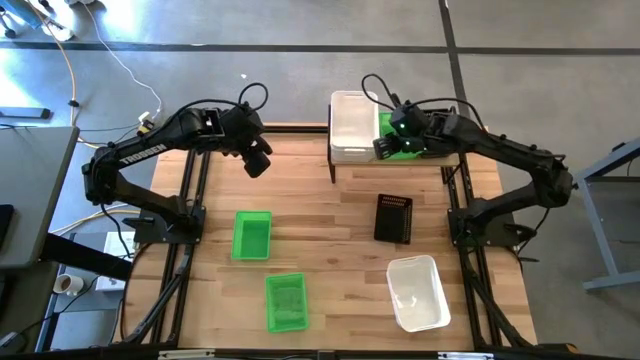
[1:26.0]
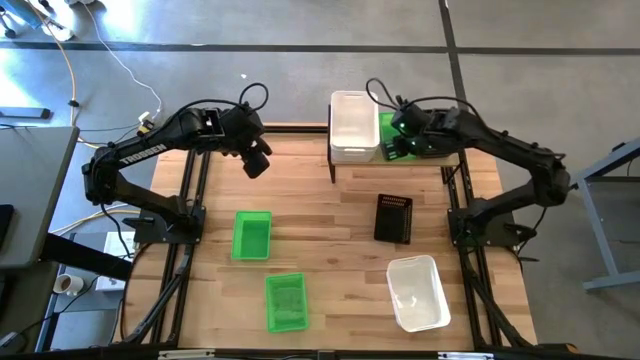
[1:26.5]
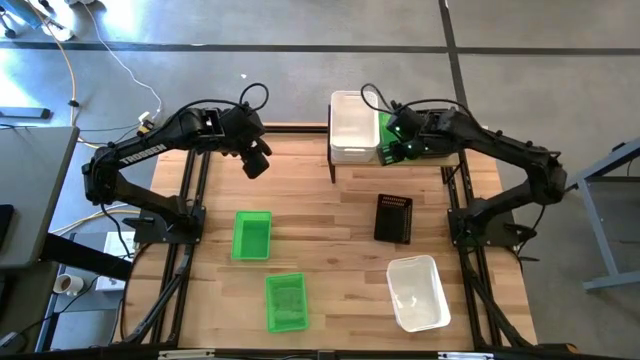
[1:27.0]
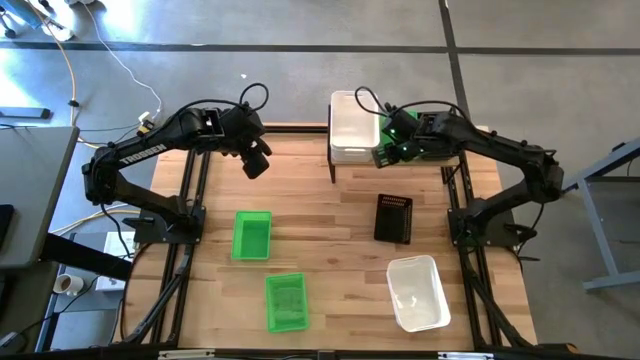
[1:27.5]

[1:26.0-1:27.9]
Task: Stack baskets on shelf by color
Adjust the green bin on the shelf

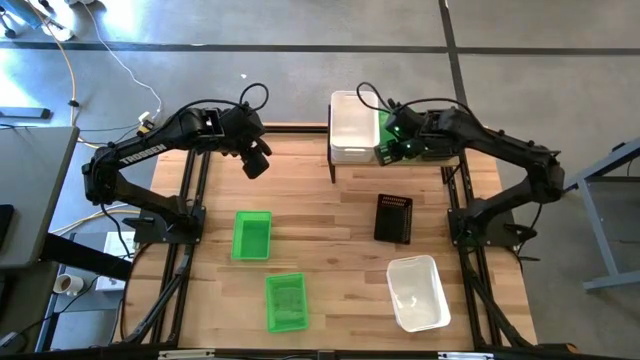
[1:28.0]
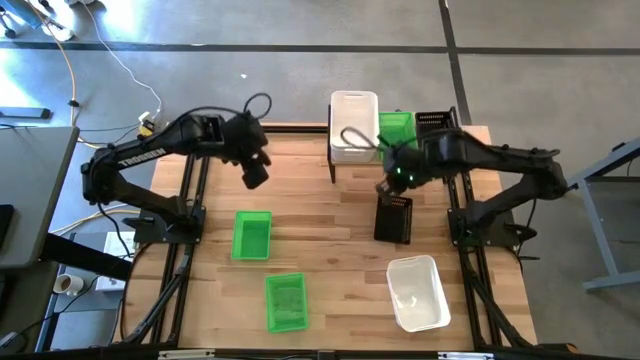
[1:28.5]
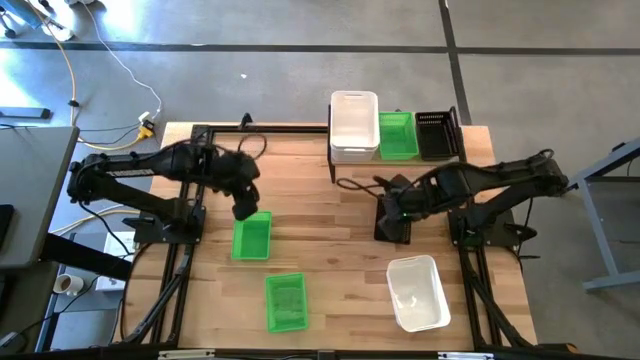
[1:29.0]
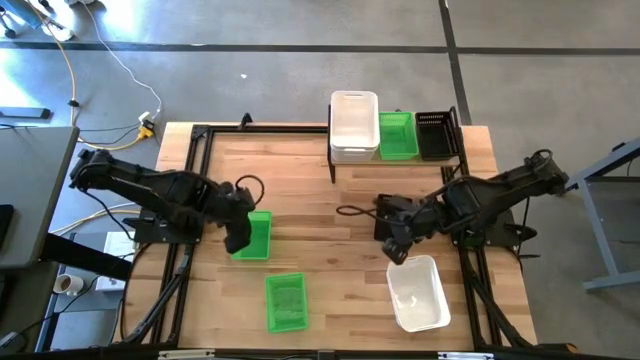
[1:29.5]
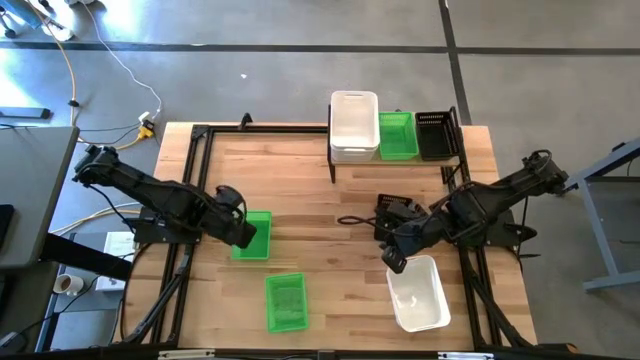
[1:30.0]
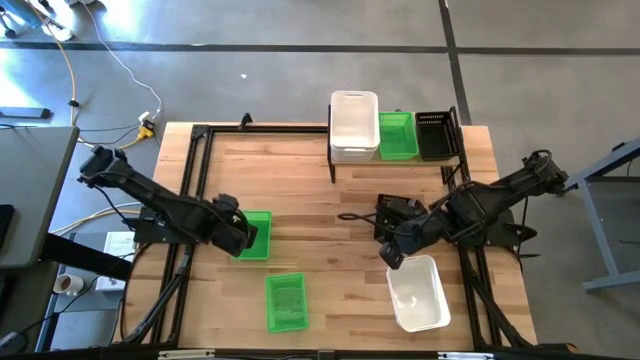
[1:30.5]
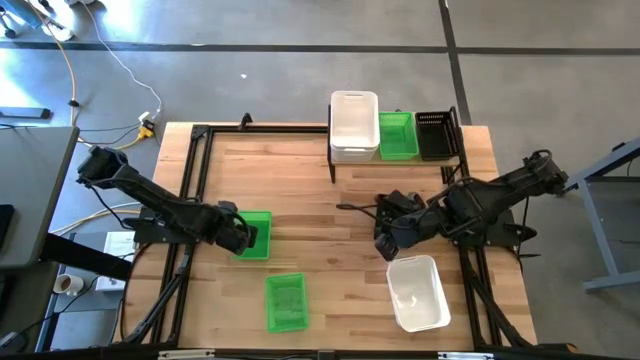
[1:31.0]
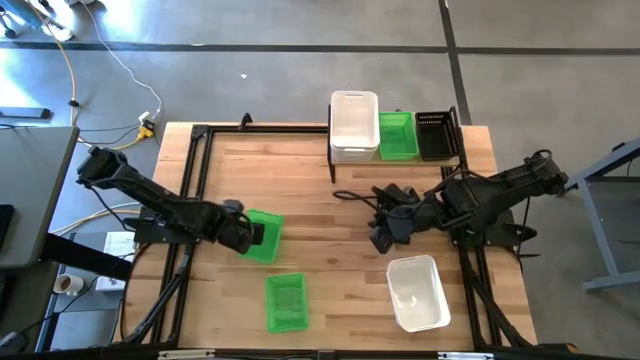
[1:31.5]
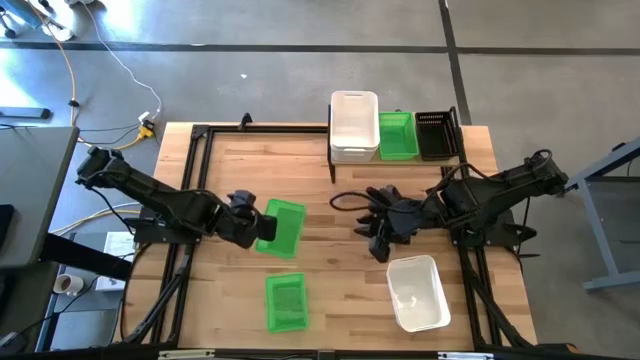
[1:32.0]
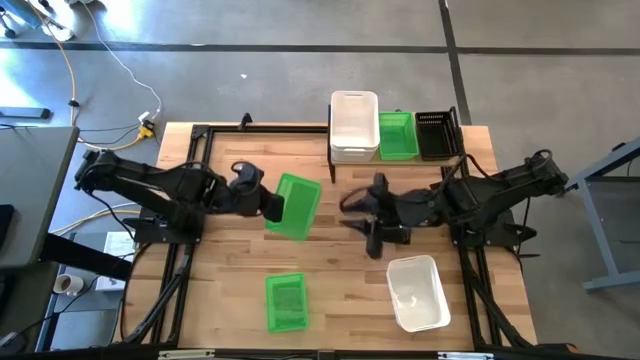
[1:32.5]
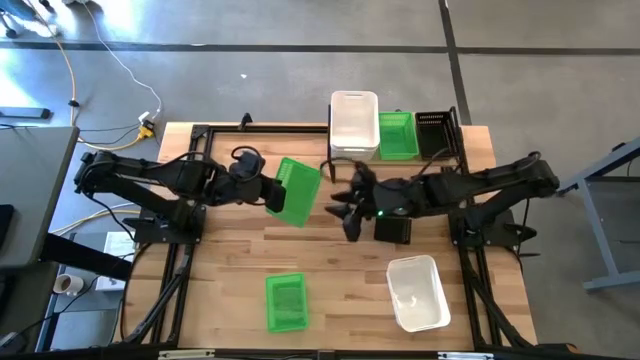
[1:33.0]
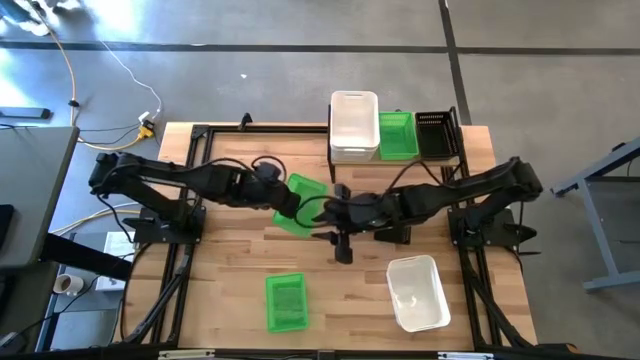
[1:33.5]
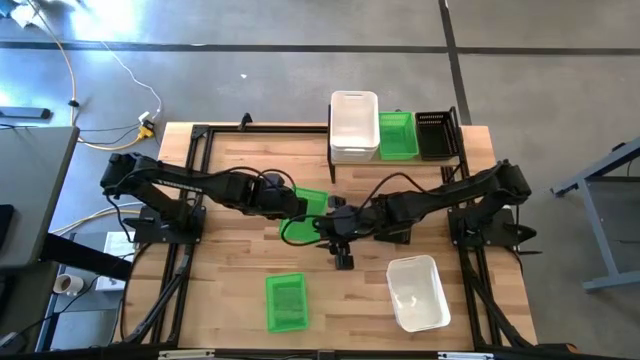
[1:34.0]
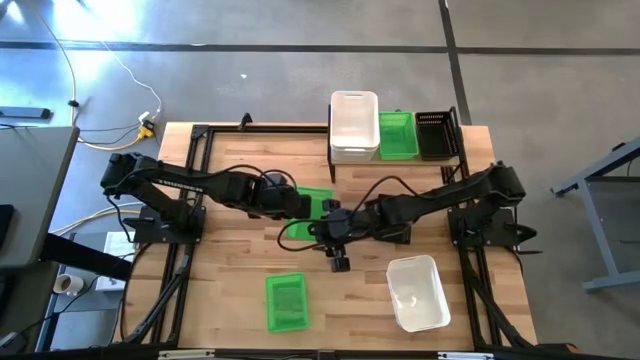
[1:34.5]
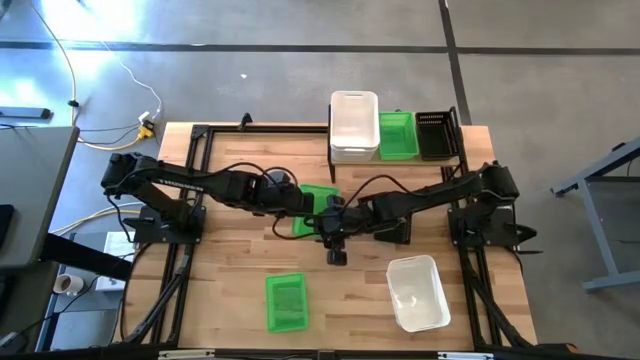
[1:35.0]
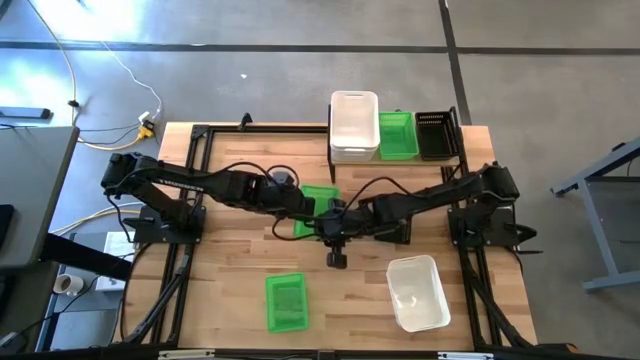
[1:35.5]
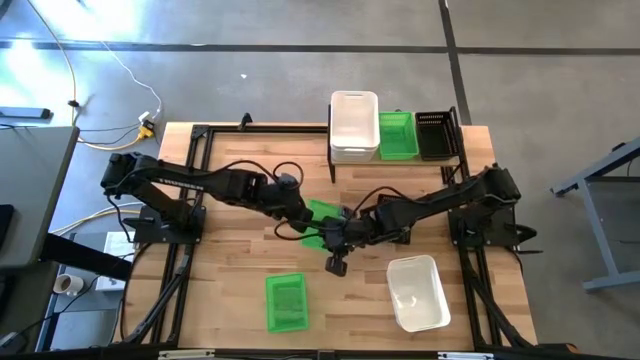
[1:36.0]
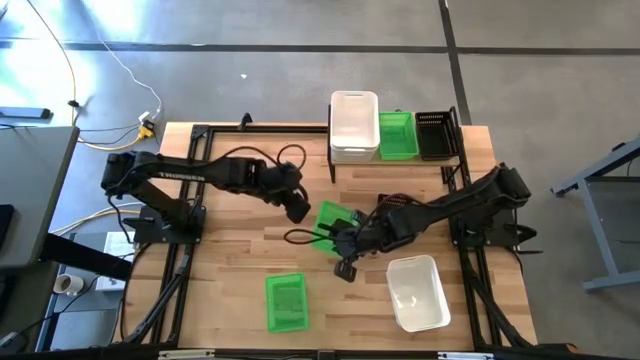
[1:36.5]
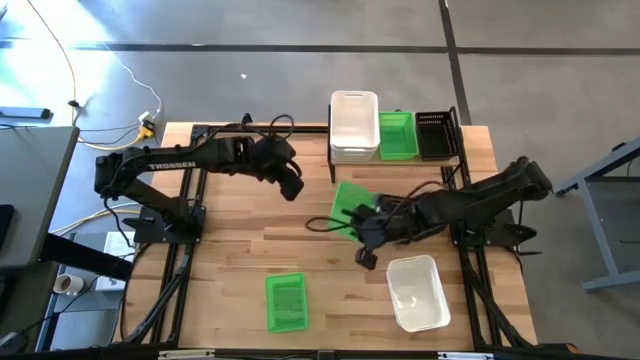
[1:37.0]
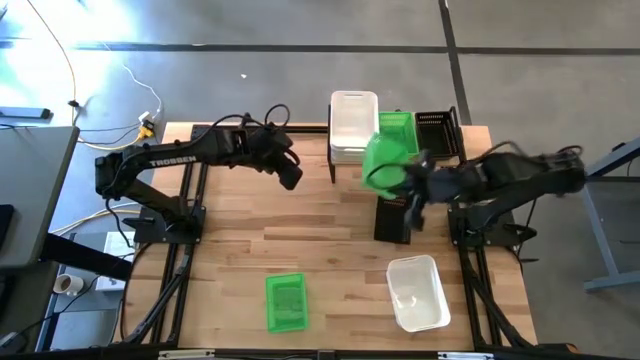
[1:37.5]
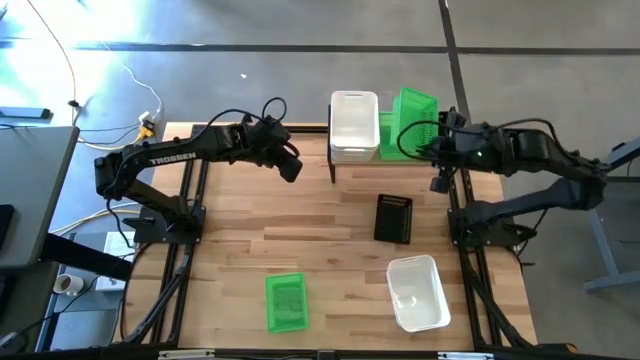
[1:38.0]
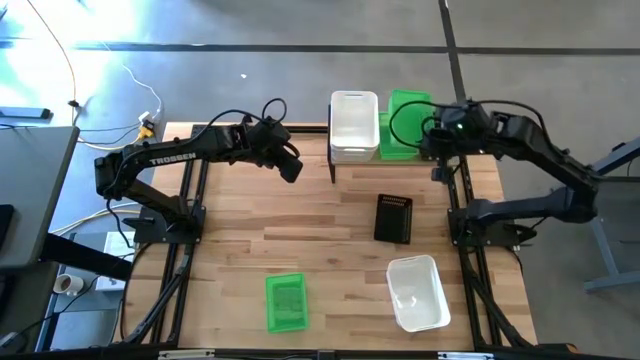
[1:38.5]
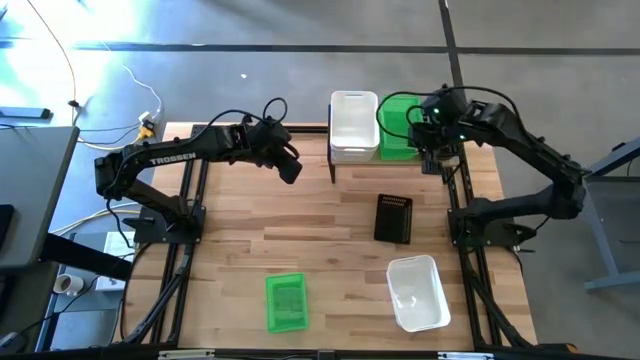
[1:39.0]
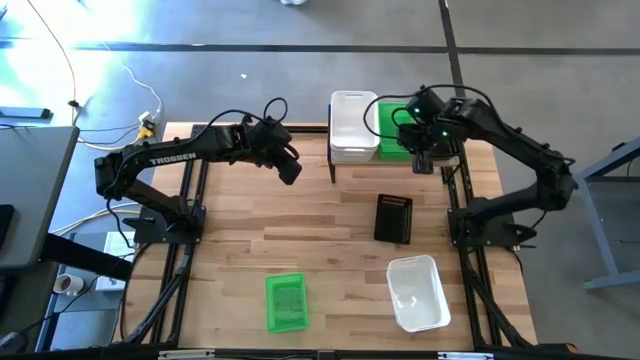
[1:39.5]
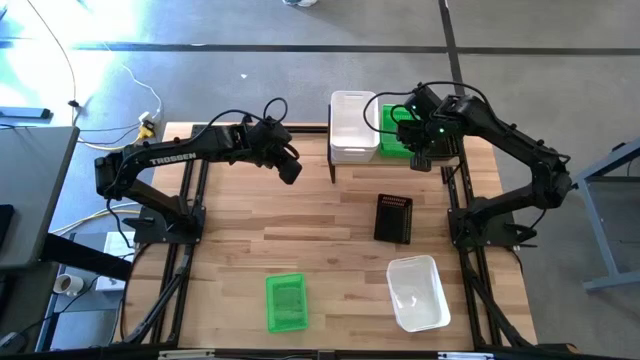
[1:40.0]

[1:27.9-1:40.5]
Stack the top green bin on top of the green bin

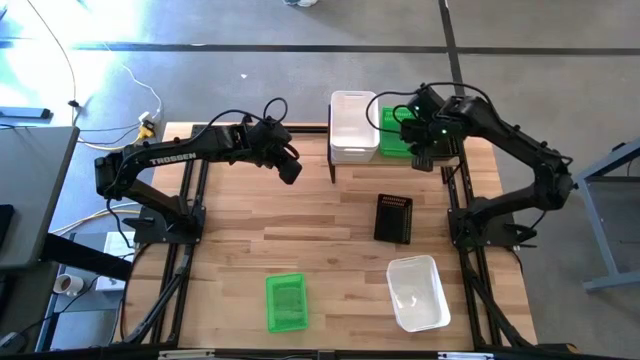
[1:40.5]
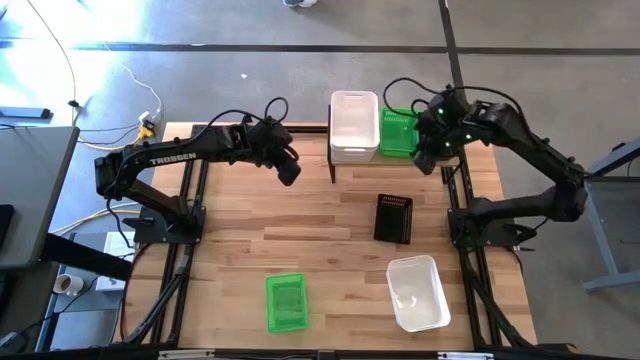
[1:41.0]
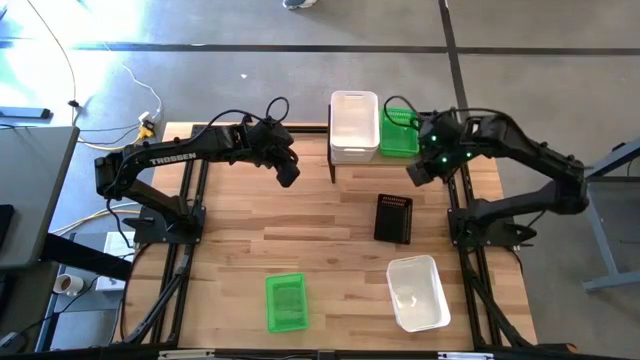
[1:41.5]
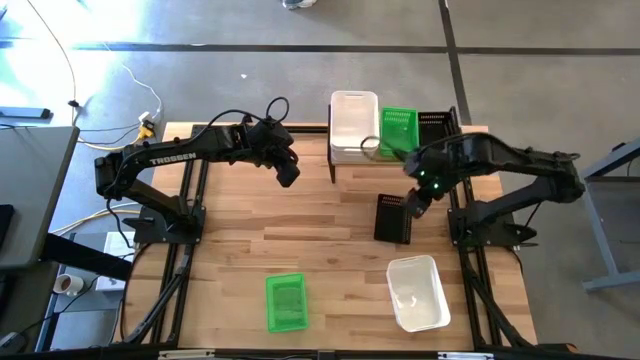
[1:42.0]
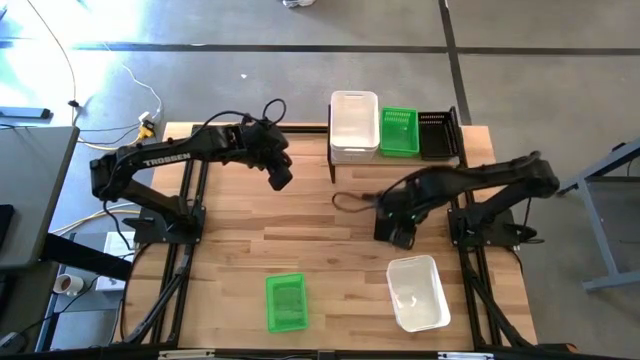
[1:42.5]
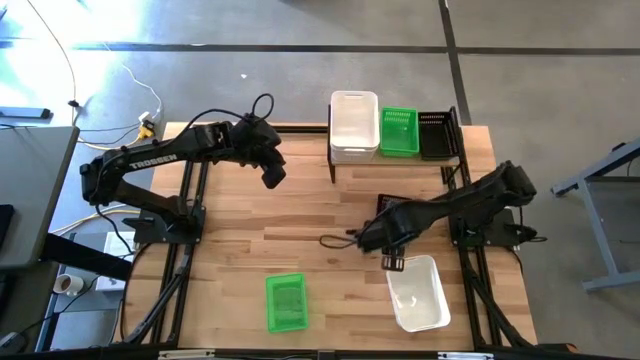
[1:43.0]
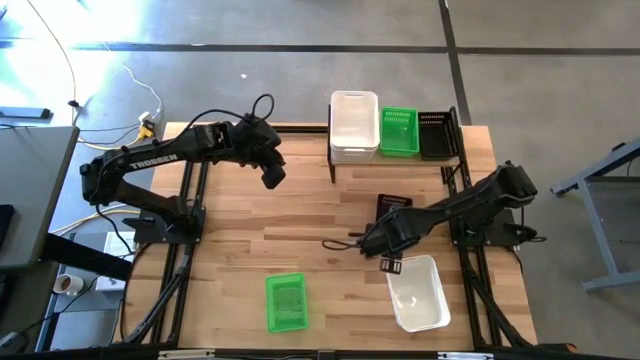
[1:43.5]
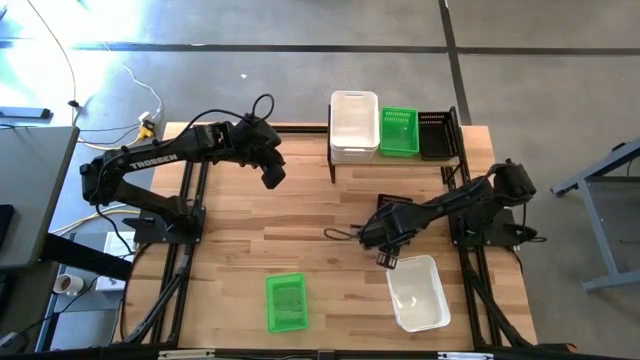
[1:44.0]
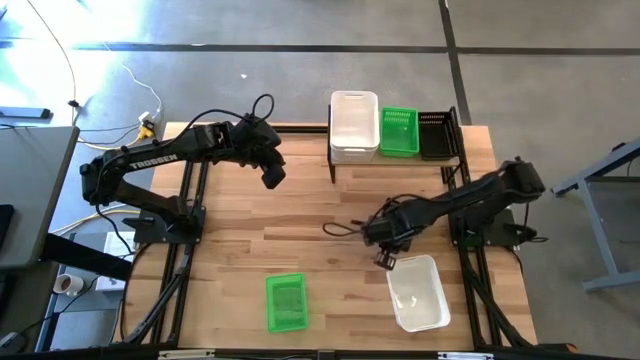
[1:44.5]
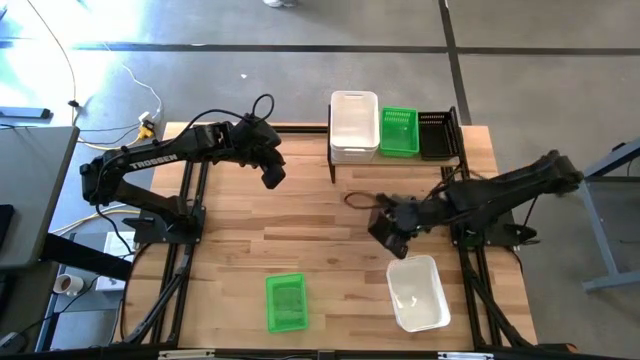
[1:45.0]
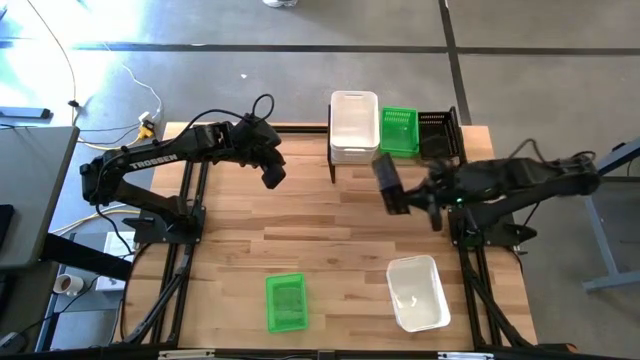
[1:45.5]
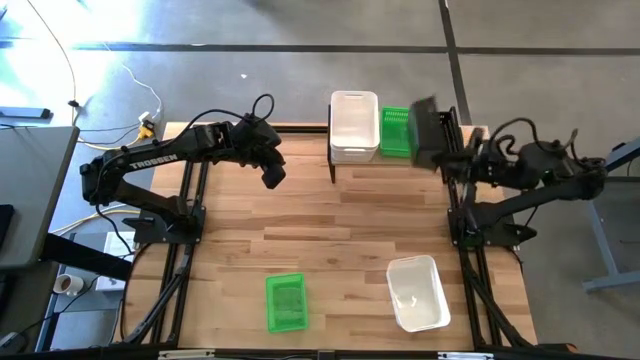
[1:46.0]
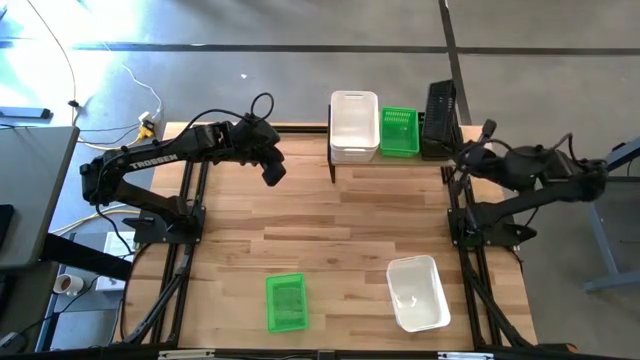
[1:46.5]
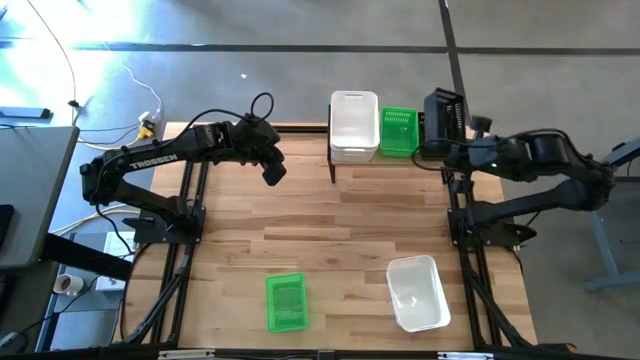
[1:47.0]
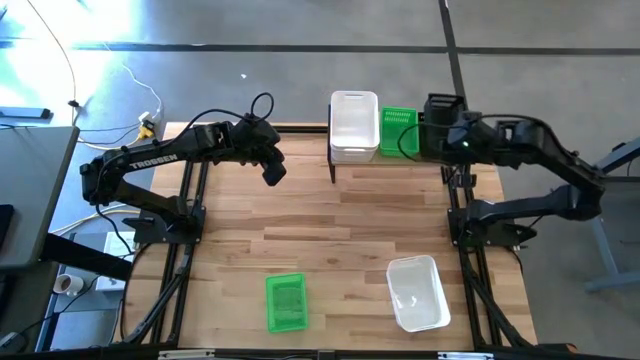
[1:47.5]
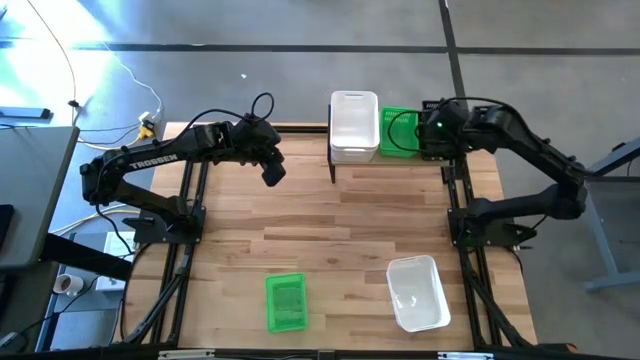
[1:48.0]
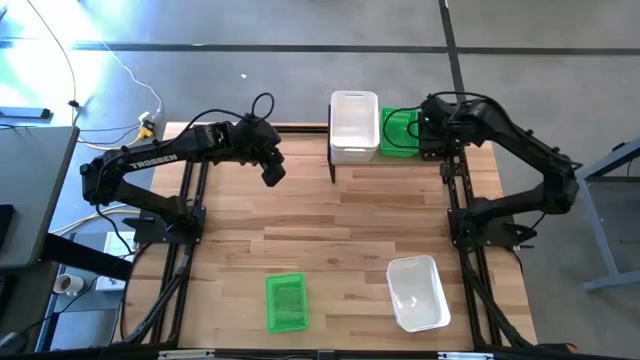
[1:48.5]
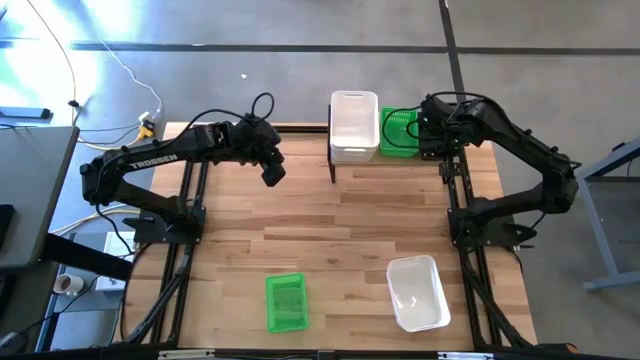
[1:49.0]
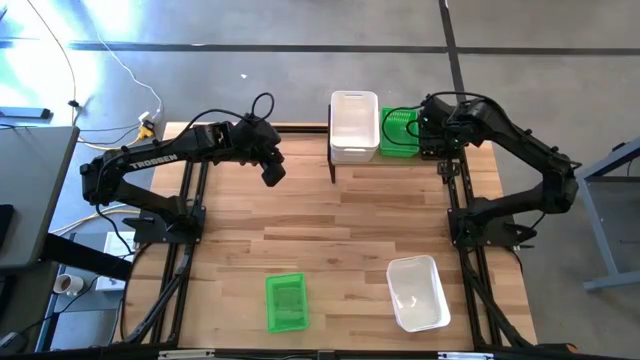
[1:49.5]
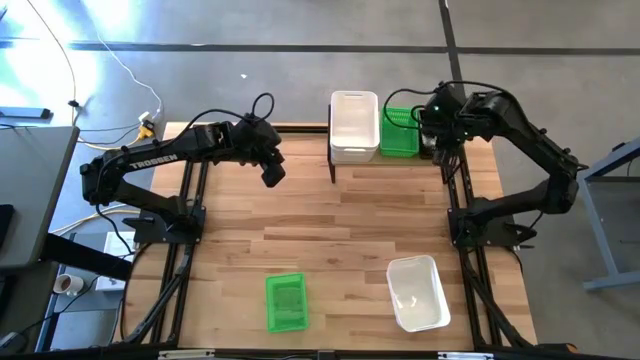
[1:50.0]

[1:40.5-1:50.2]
Stack the black bin on top of the black bin
